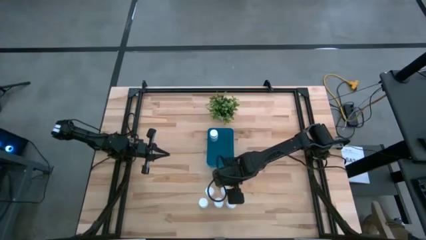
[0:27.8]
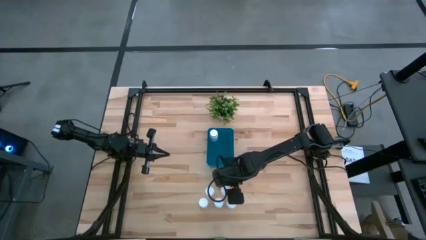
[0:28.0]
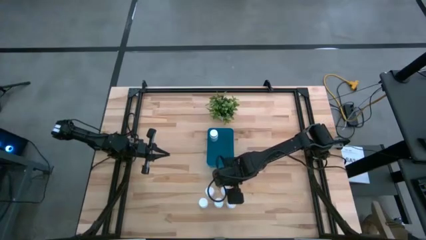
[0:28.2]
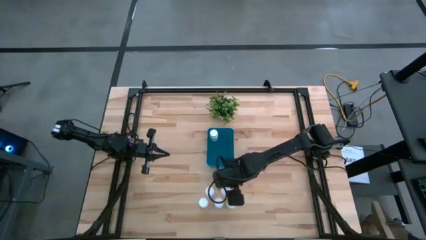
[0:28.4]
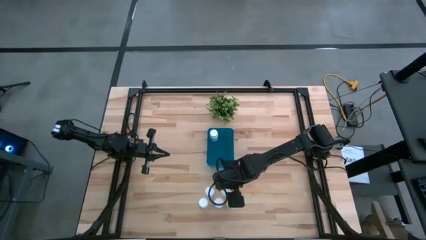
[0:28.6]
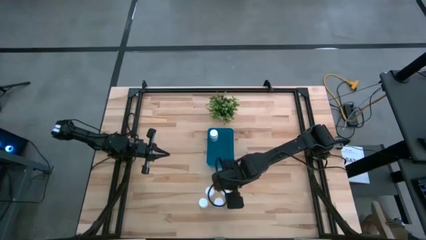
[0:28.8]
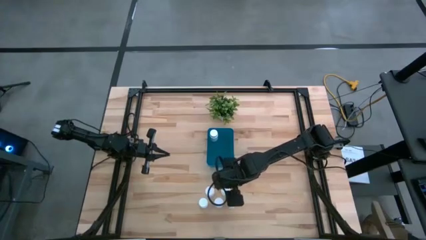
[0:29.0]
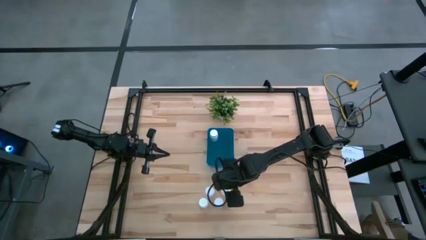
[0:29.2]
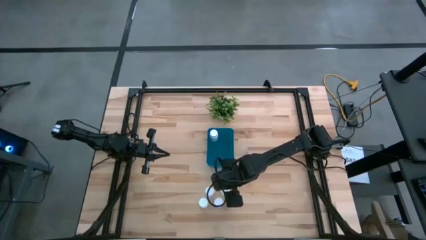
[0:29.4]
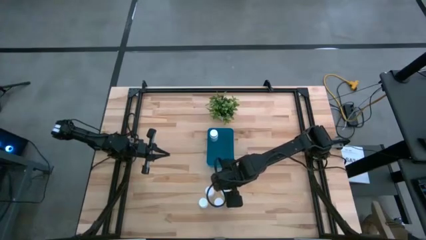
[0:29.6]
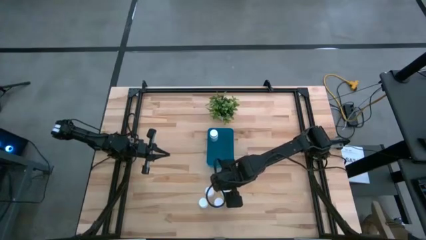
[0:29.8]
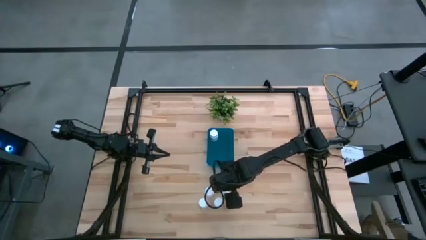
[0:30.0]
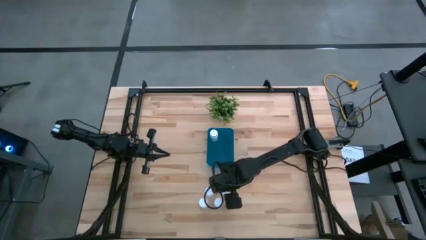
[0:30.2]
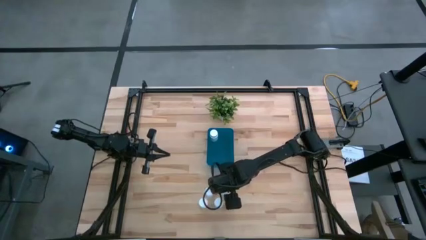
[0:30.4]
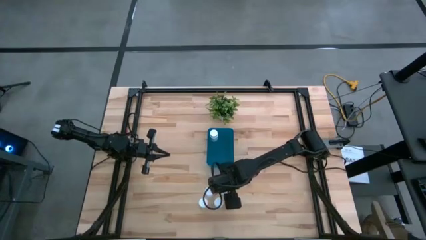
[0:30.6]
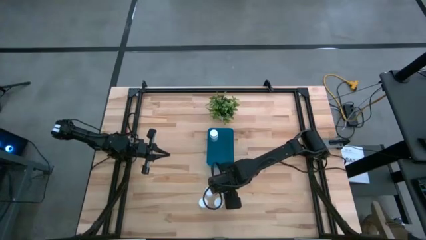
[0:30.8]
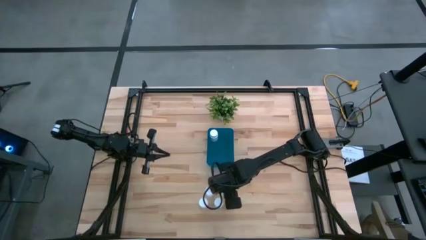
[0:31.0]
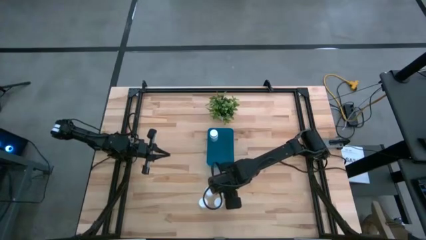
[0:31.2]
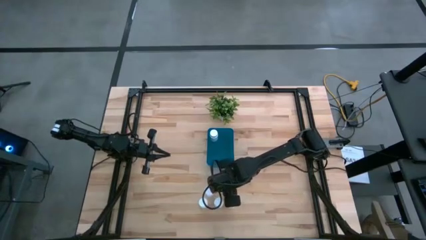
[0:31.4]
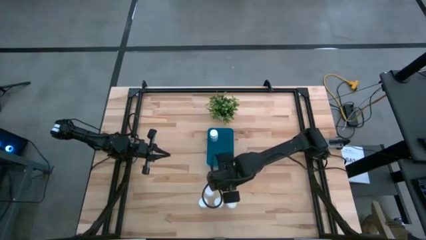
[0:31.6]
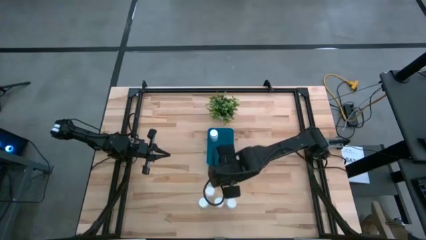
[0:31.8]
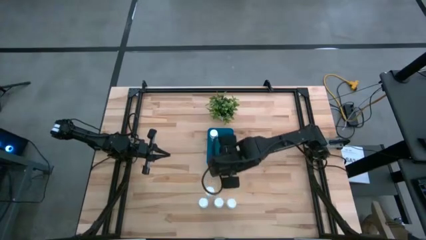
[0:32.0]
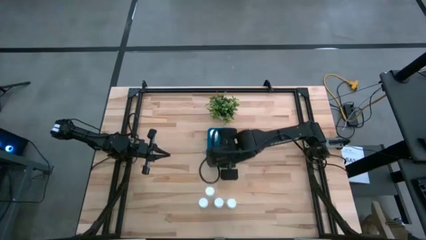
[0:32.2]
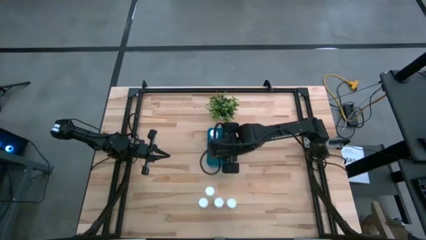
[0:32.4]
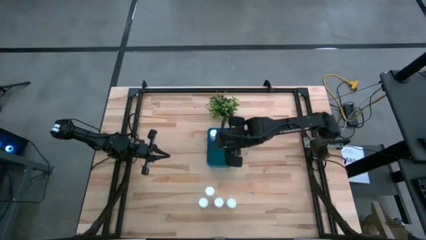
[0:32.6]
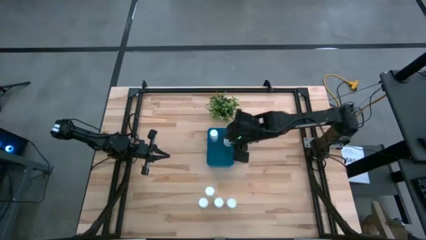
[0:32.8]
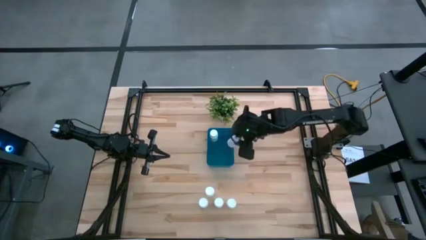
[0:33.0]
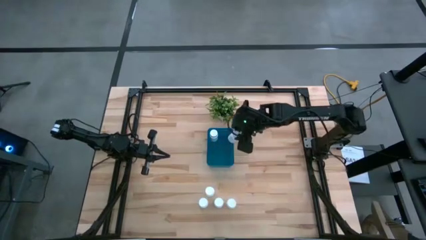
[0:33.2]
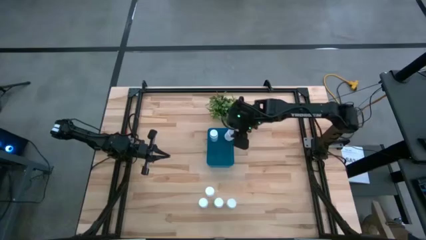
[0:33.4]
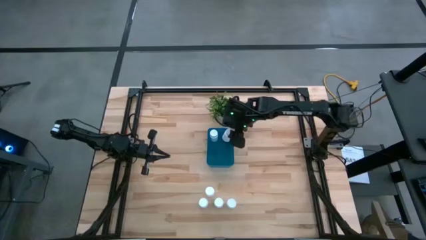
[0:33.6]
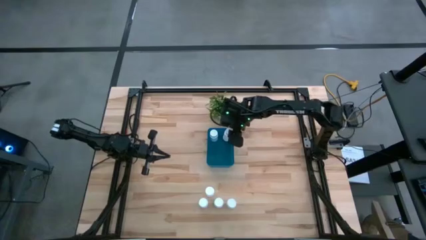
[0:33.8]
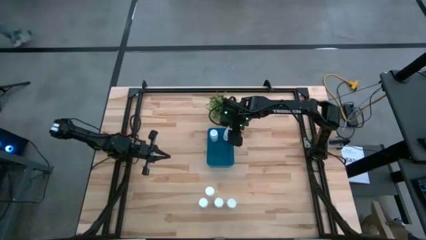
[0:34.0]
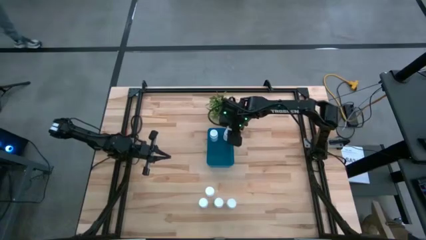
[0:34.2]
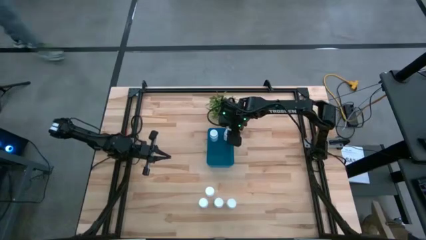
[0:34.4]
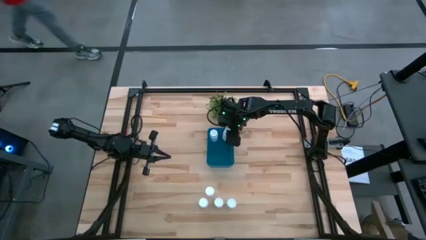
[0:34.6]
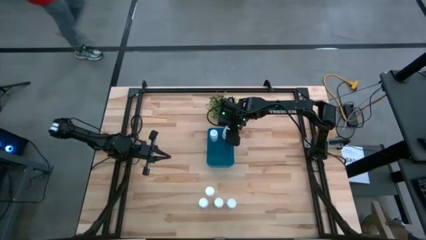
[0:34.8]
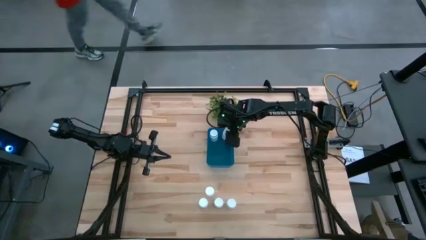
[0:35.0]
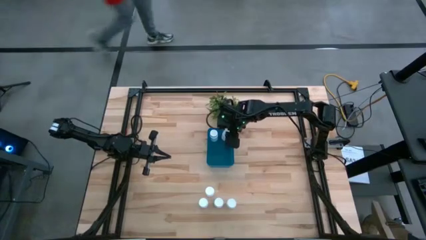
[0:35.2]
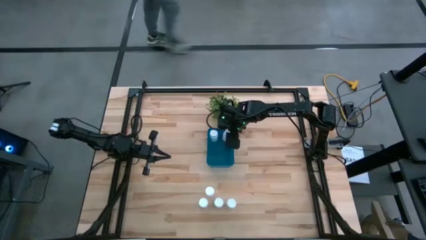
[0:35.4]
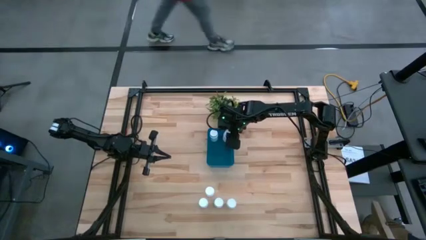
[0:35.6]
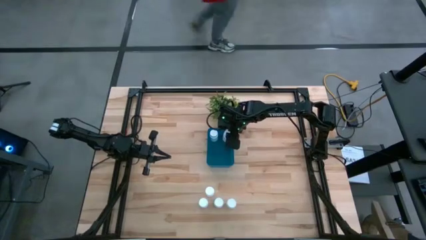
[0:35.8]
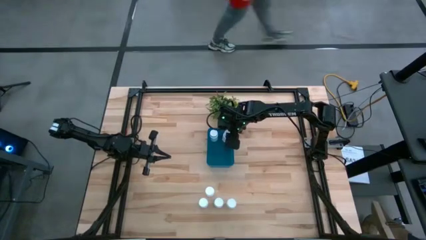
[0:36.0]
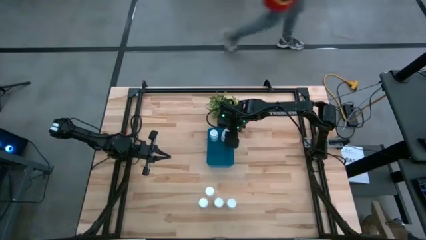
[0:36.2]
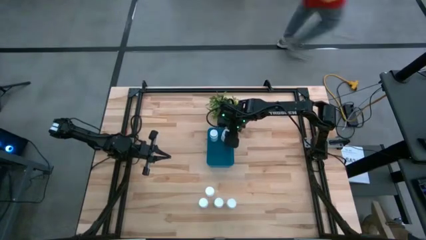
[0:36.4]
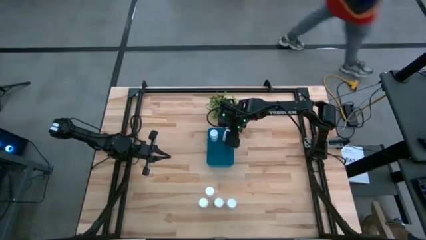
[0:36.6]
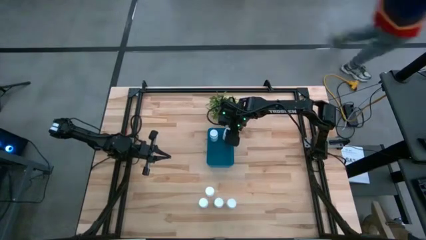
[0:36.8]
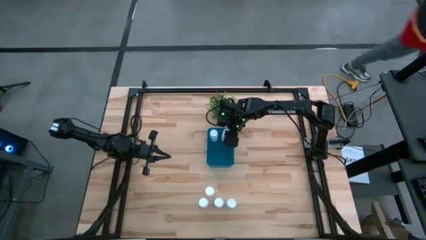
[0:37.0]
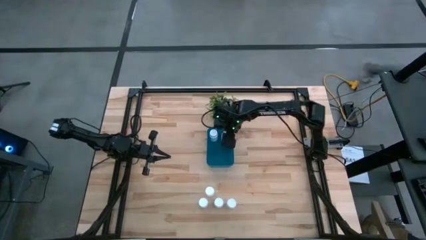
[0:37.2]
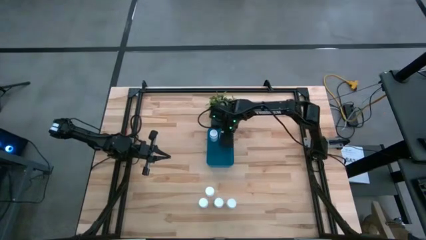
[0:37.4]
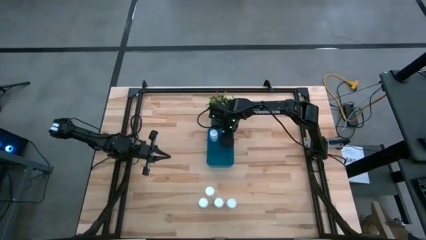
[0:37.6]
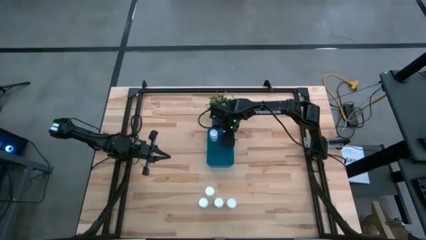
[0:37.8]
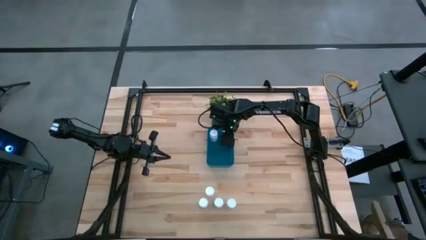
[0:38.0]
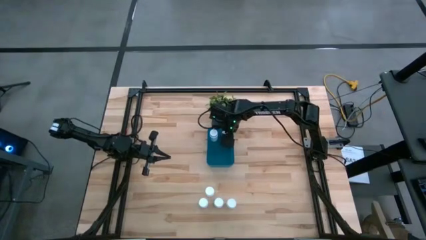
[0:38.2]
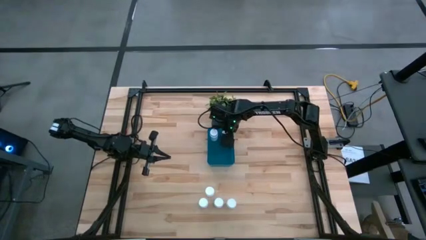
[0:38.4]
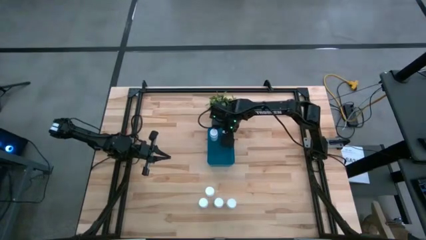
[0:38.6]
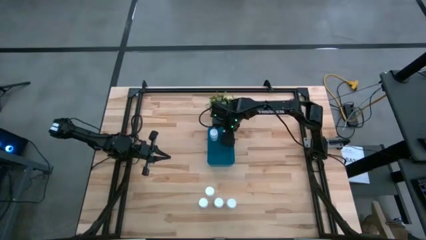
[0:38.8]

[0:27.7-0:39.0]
Task: Pick and place pill bottles into a basket
Put the white pill bottle into the blue bin
